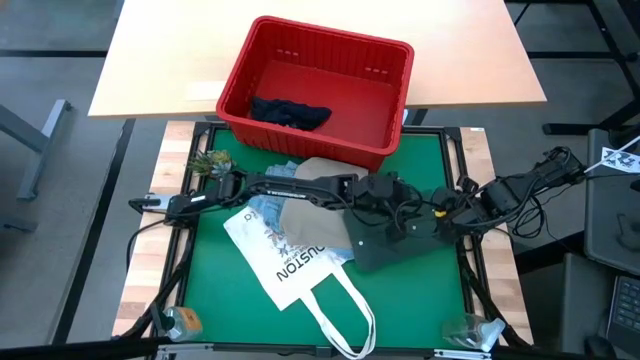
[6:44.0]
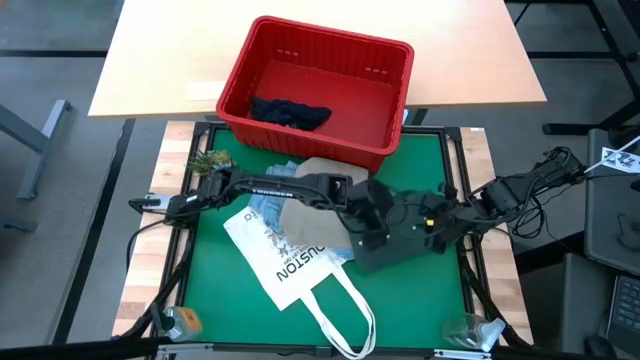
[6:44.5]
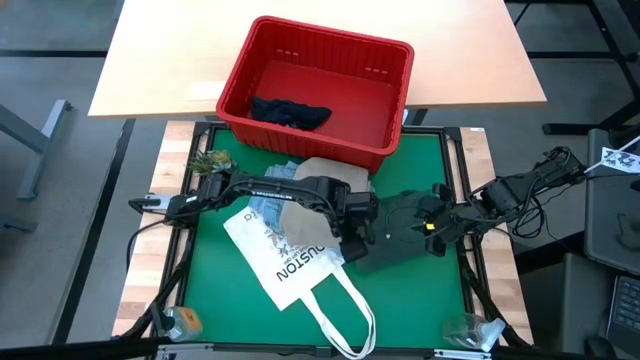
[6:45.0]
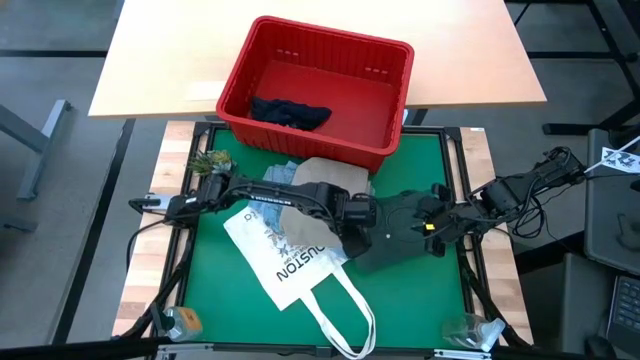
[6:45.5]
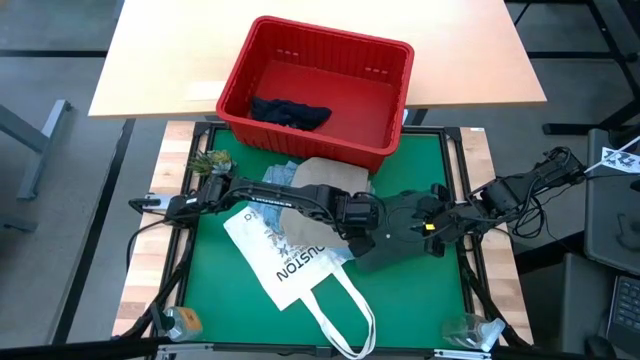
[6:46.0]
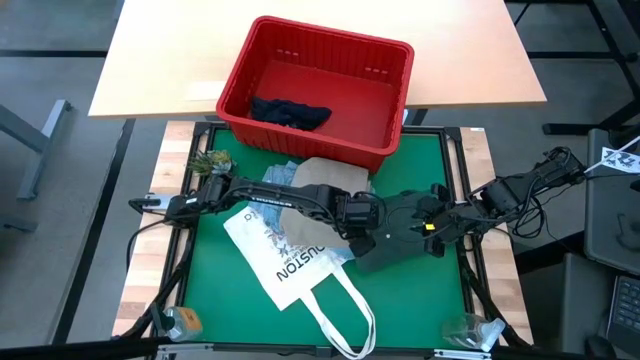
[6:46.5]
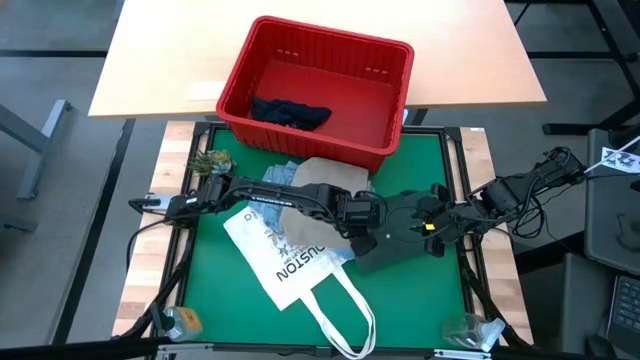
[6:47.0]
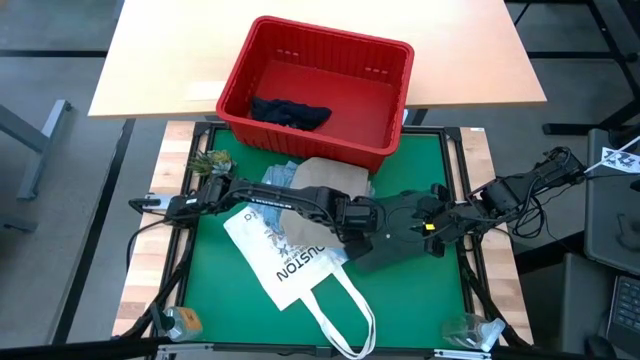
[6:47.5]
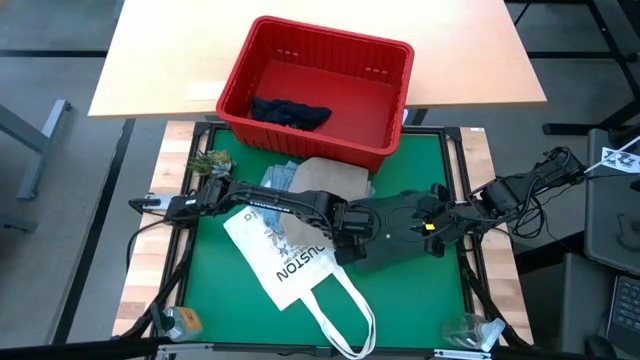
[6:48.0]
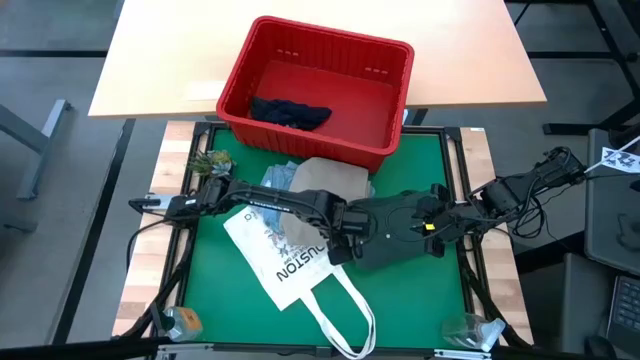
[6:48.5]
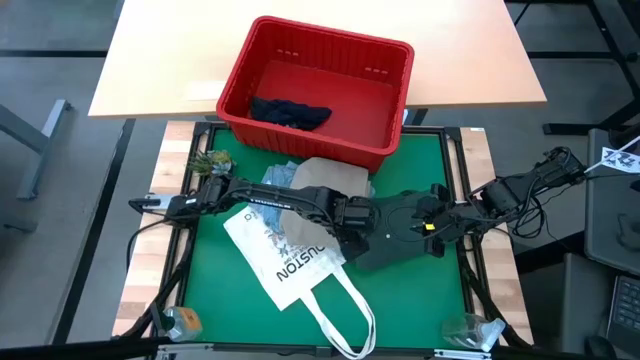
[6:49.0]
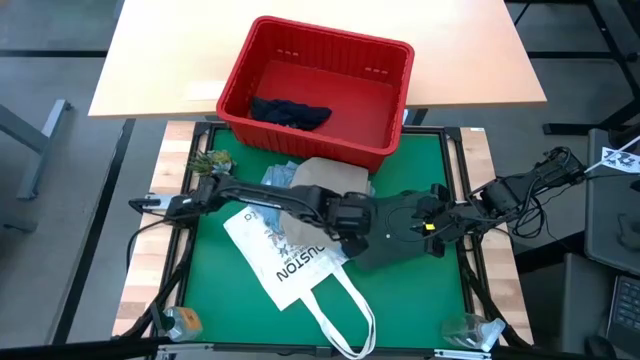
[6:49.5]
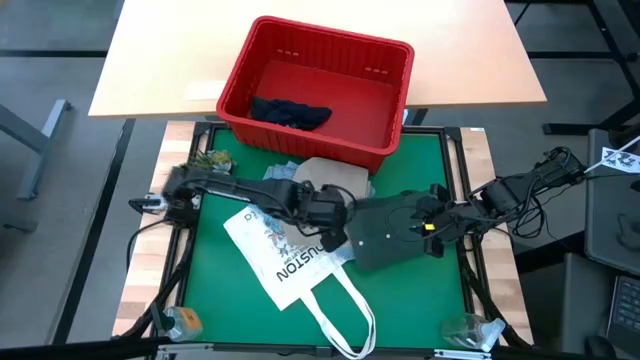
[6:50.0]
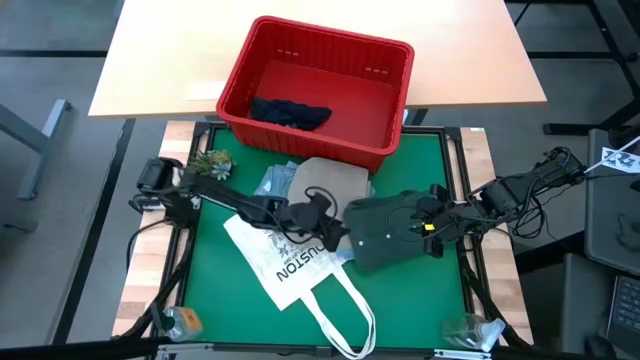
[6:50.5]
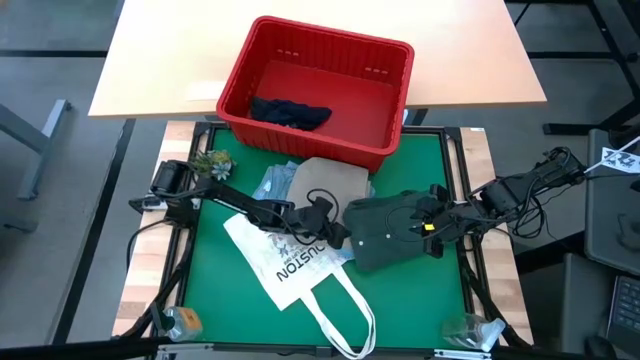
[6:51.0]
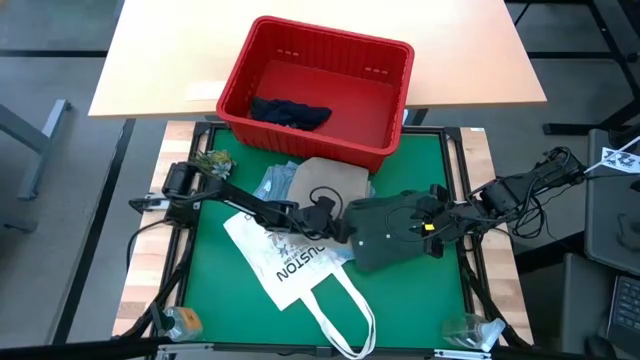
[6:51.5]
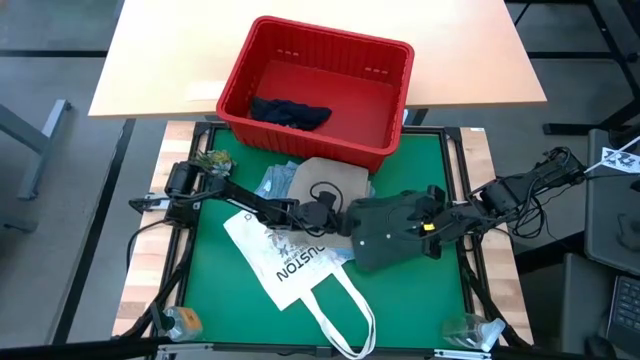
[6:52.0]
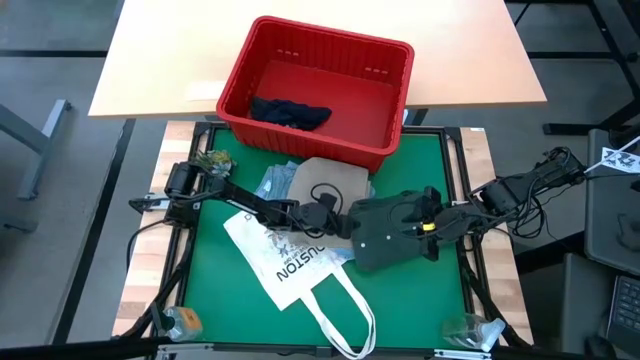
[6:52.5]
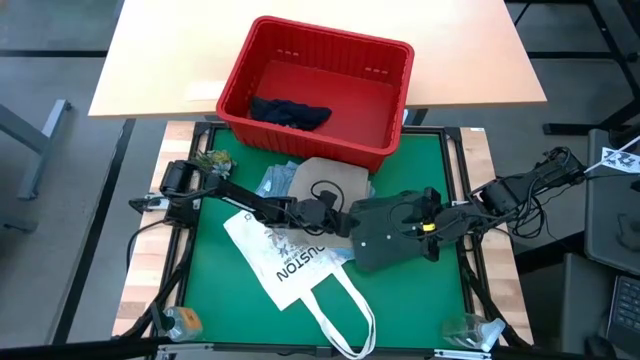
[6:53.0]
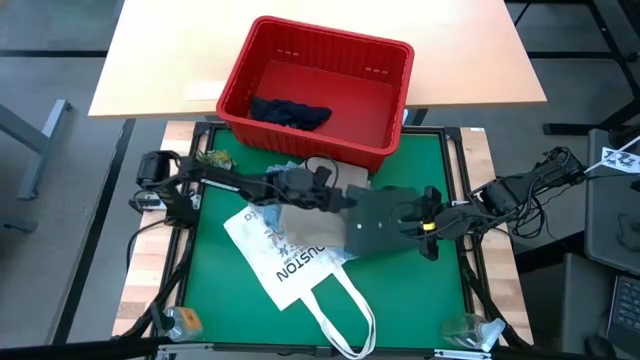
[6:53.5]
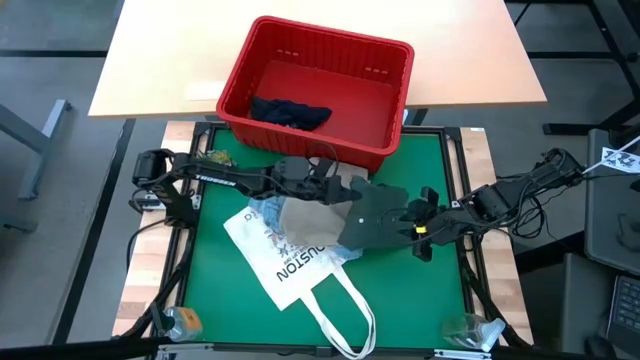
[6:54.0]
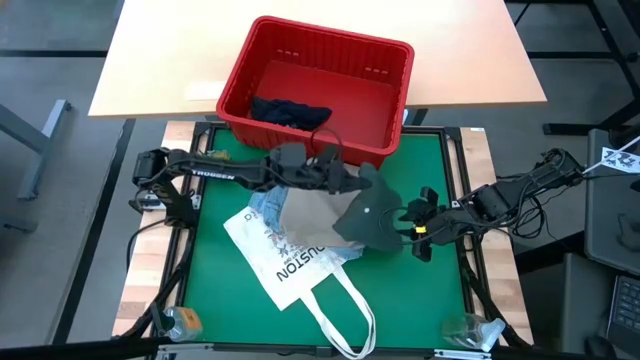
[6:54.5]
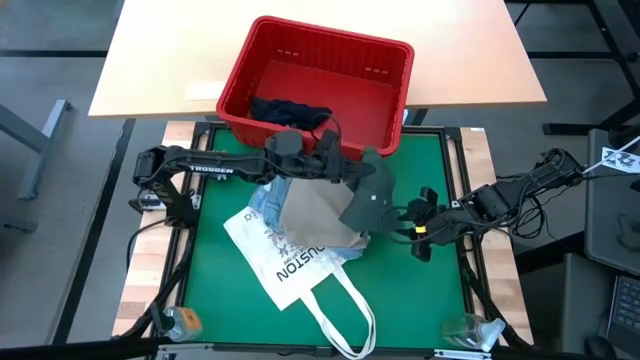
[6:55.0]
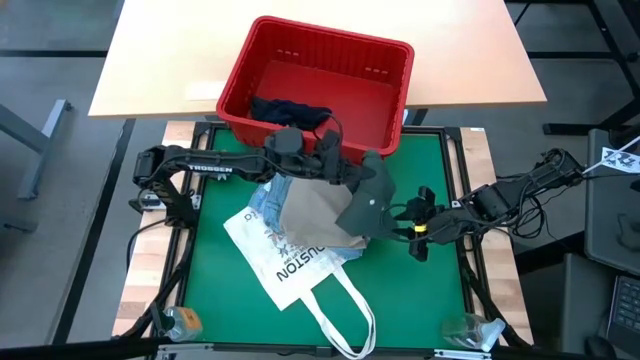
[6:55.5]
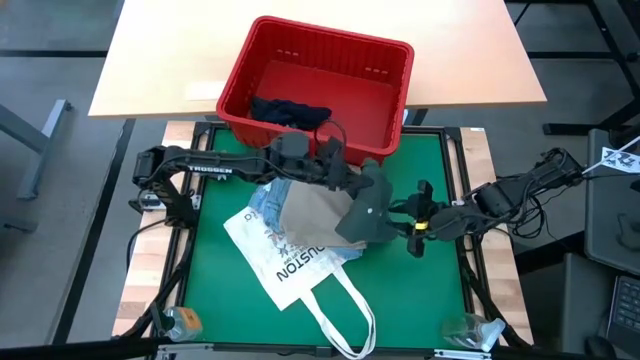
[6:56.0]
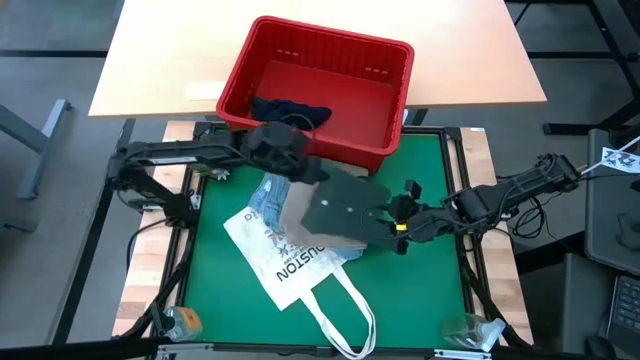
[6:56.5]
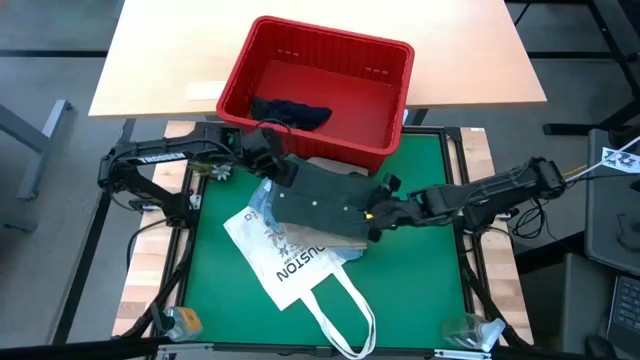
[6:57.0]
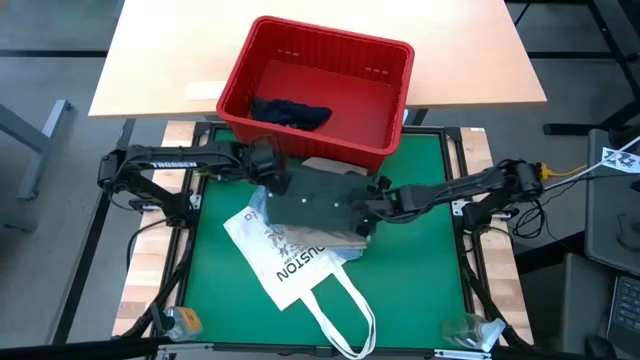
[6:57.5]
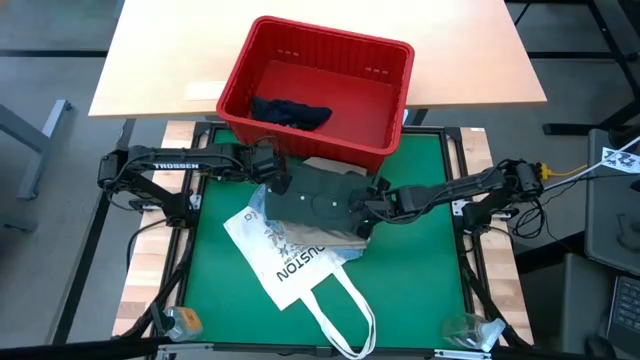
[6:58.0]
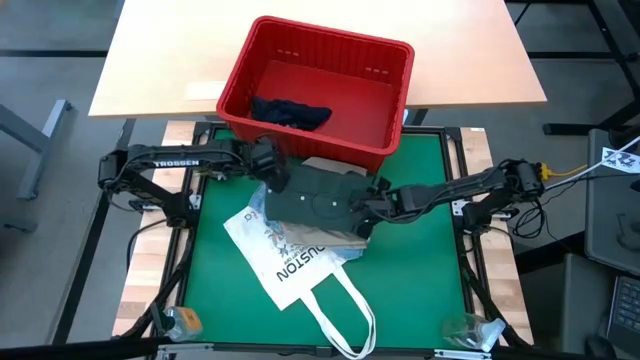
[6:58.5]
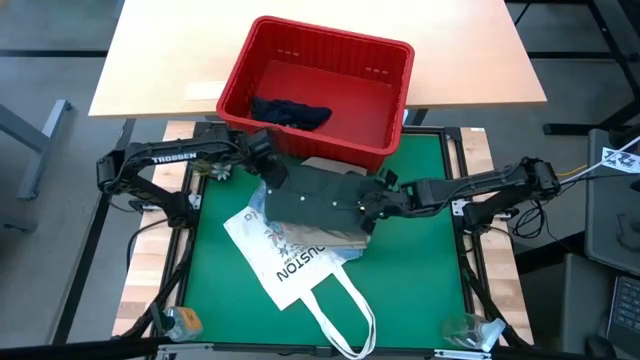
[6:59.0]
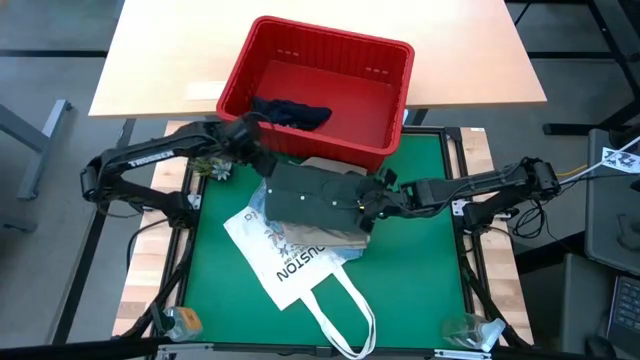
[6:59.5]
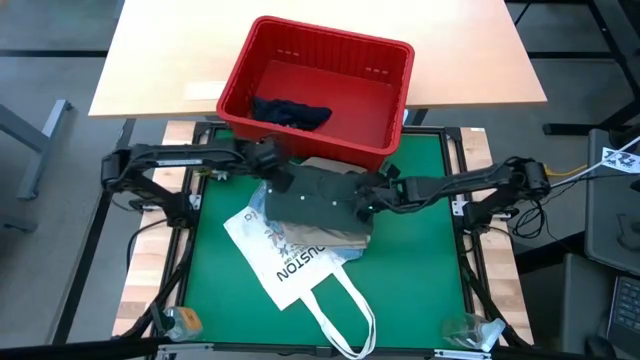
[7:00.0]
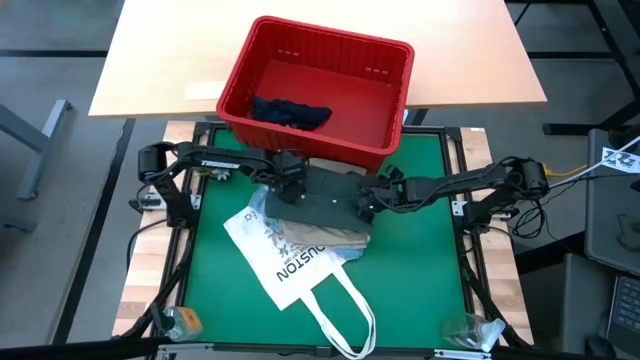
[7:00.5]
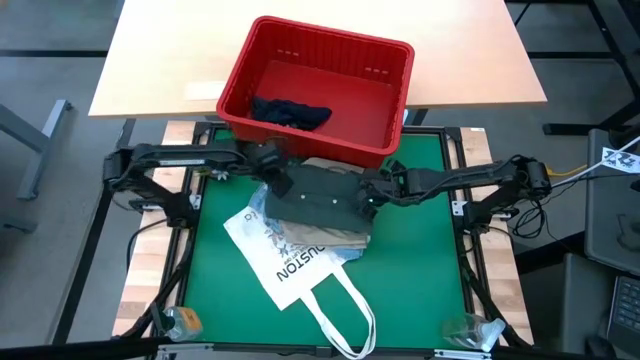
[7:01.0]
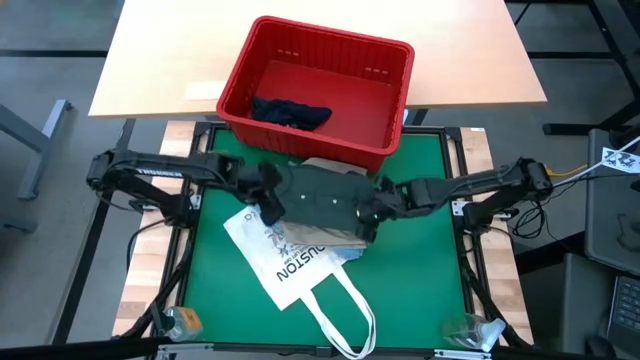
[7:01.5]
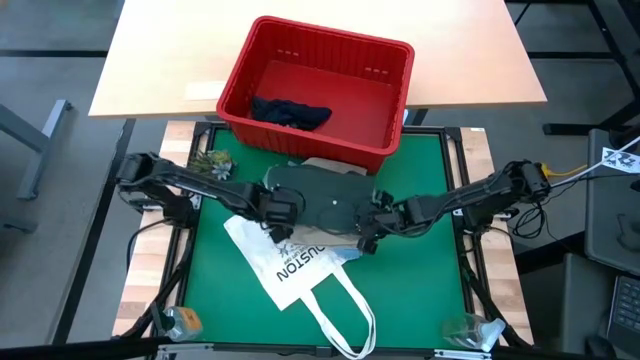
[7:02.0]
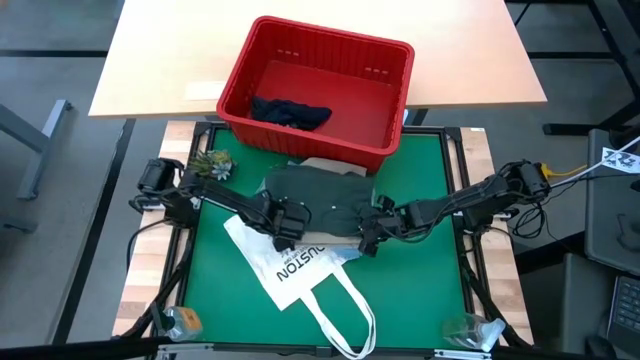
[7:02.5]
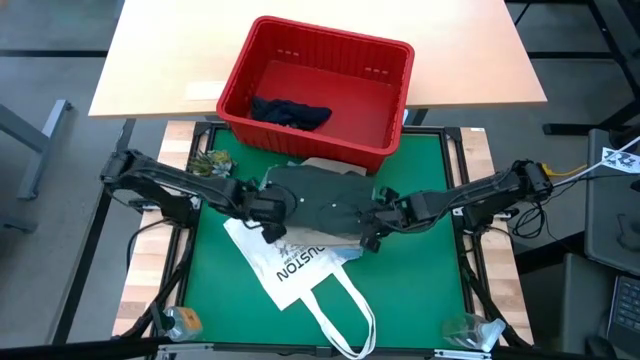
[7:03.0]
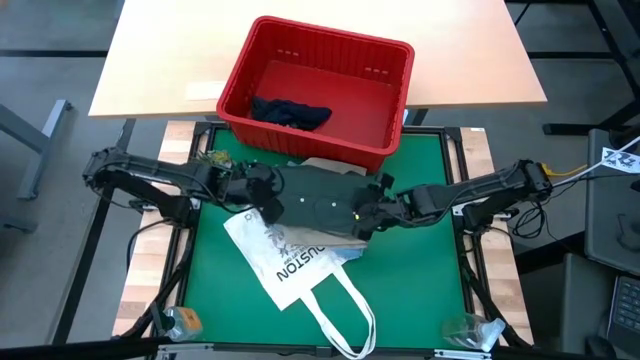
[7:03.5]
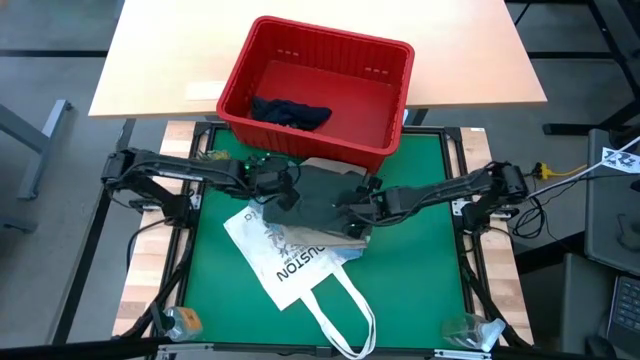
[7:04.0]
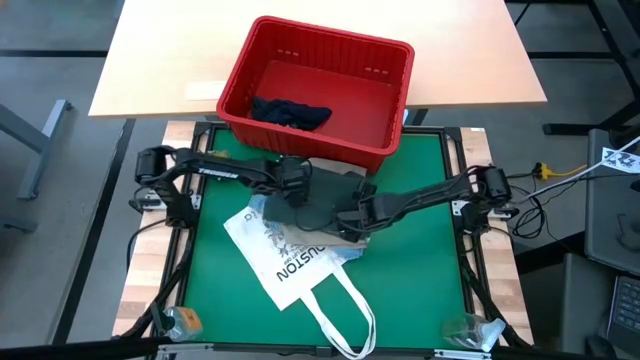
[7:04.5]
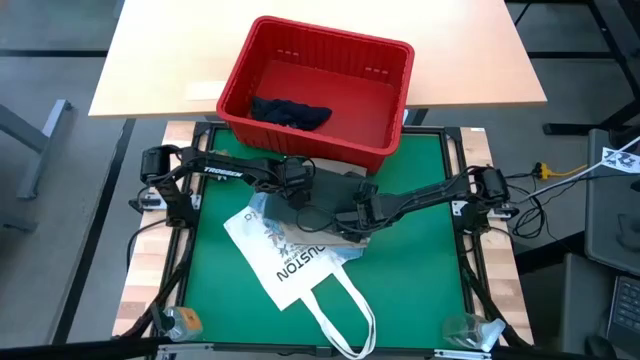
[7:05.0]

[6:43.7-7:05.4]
Task: Fold Laundry from Bin
Stack the green shirt on top of the beige shorts
